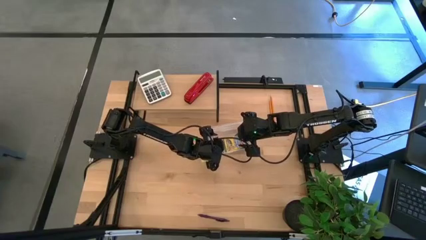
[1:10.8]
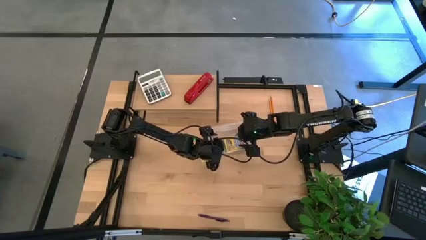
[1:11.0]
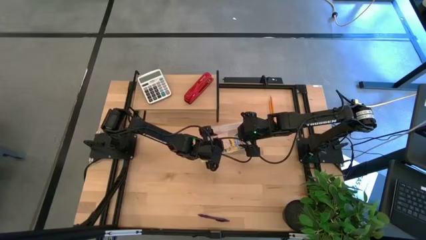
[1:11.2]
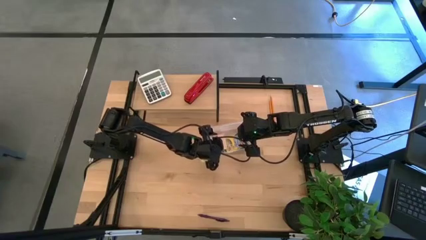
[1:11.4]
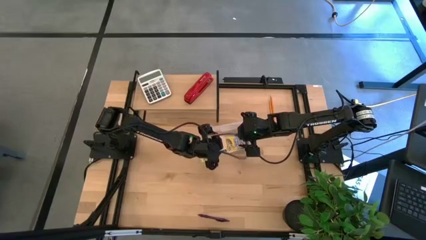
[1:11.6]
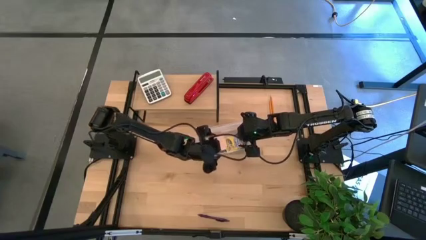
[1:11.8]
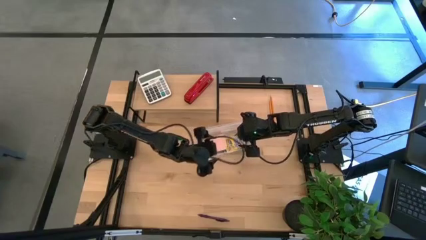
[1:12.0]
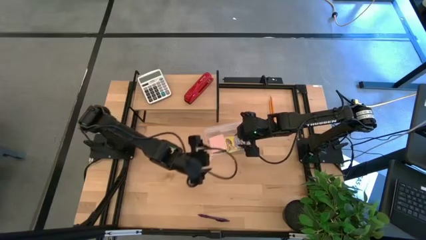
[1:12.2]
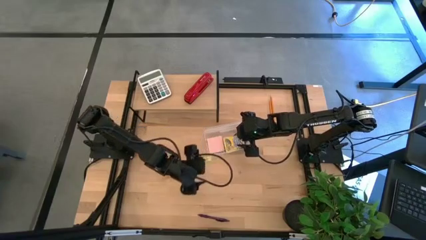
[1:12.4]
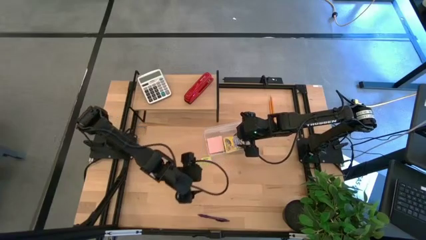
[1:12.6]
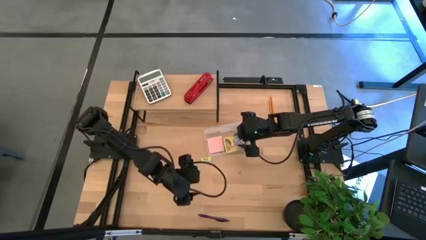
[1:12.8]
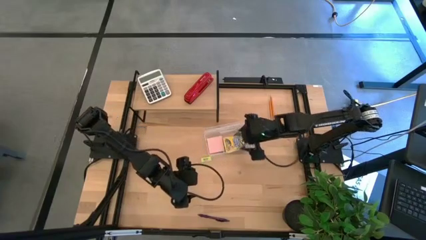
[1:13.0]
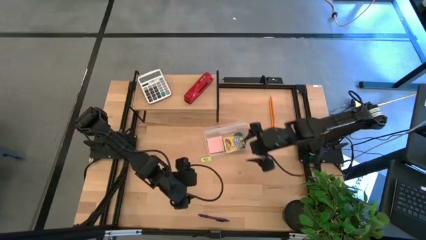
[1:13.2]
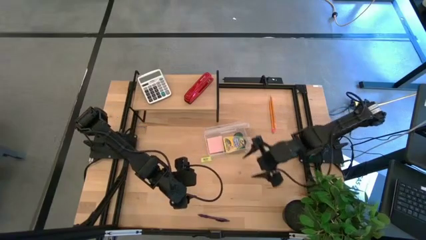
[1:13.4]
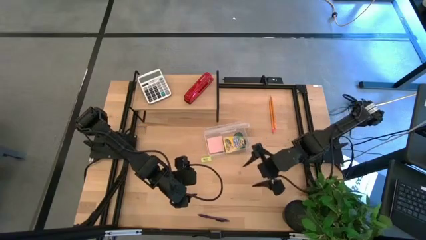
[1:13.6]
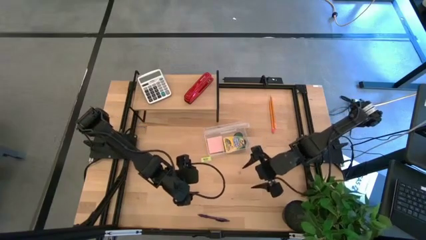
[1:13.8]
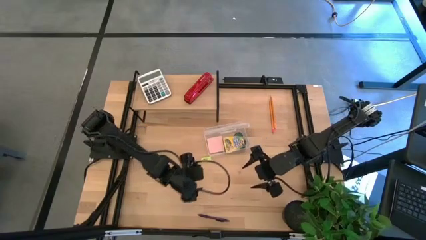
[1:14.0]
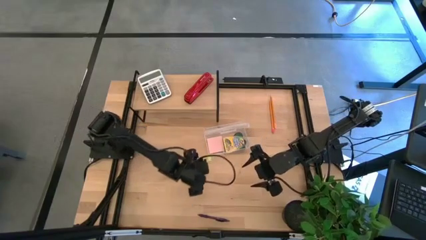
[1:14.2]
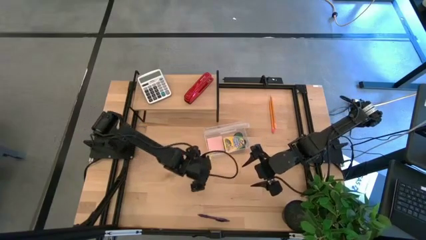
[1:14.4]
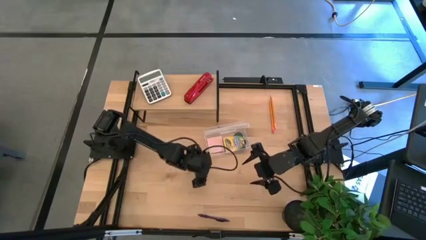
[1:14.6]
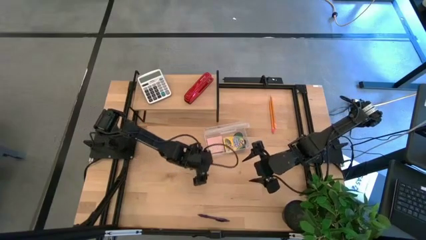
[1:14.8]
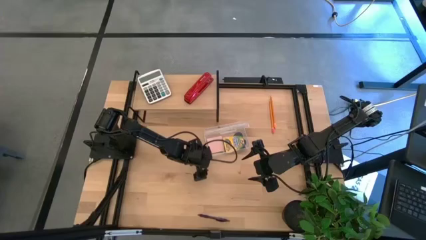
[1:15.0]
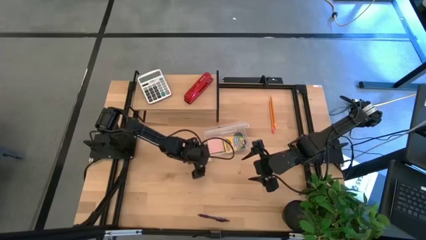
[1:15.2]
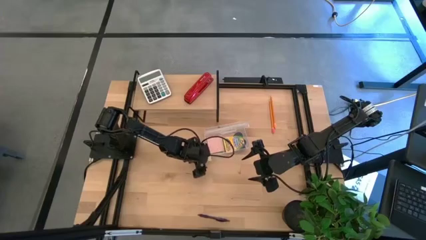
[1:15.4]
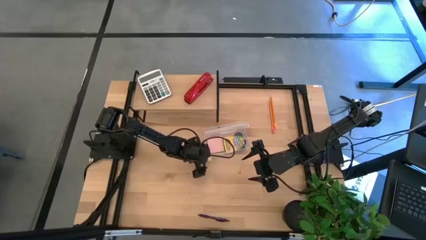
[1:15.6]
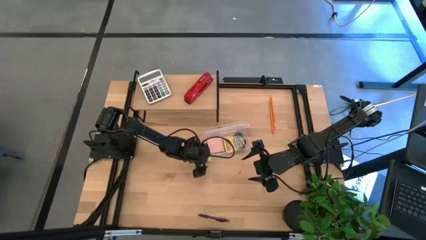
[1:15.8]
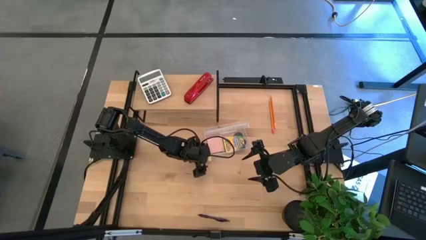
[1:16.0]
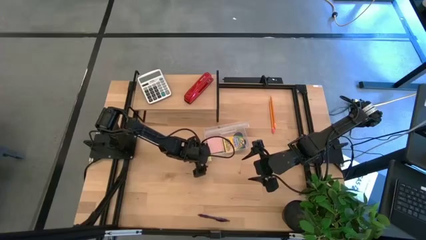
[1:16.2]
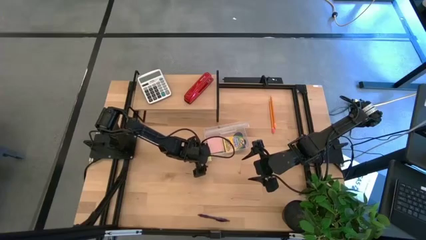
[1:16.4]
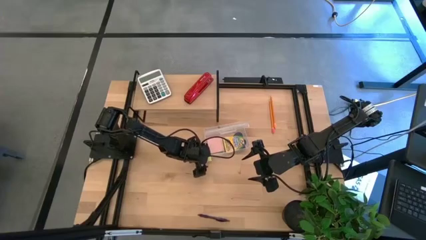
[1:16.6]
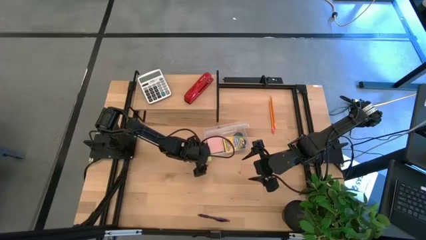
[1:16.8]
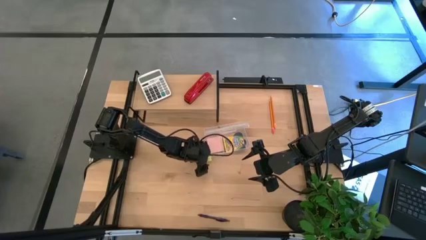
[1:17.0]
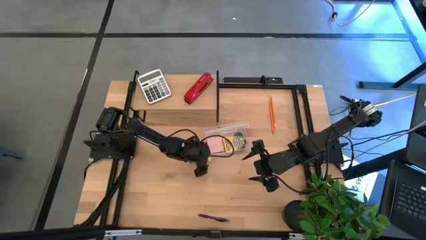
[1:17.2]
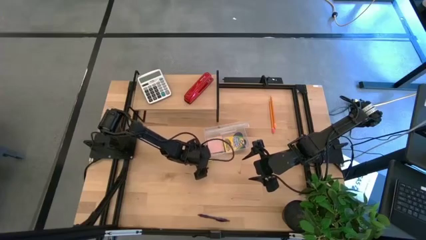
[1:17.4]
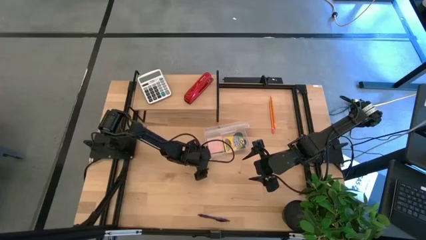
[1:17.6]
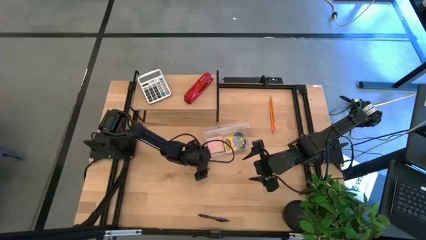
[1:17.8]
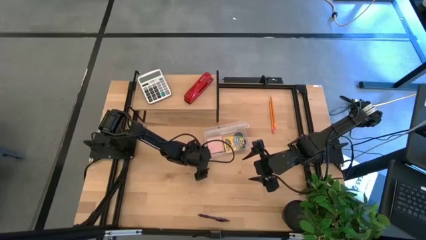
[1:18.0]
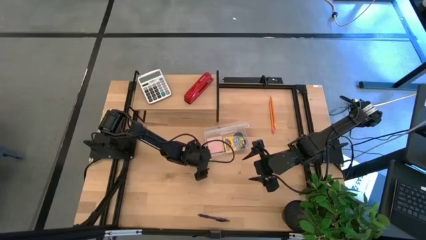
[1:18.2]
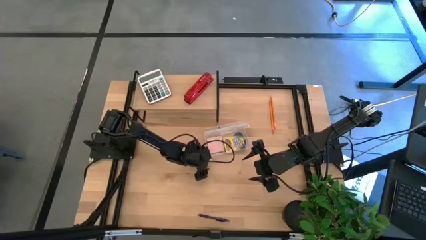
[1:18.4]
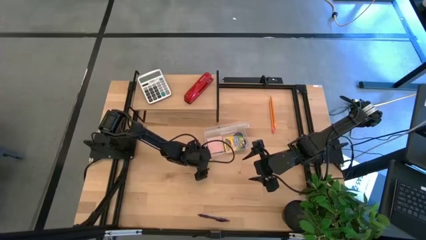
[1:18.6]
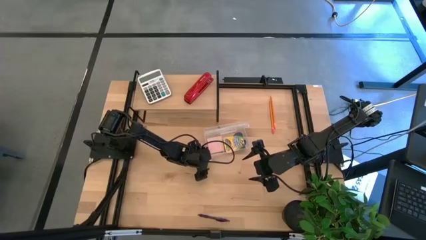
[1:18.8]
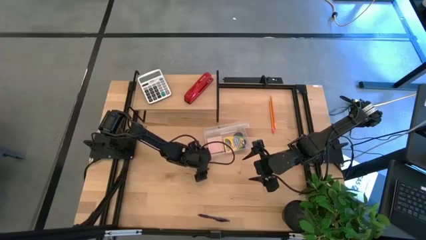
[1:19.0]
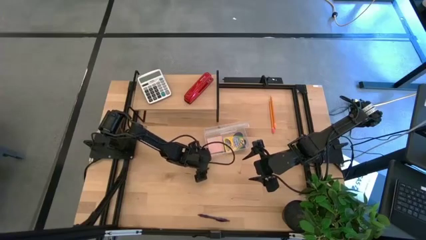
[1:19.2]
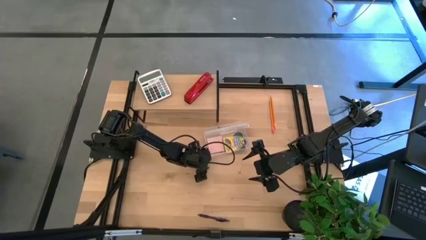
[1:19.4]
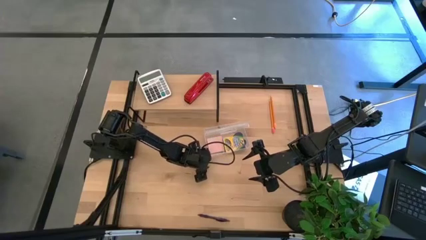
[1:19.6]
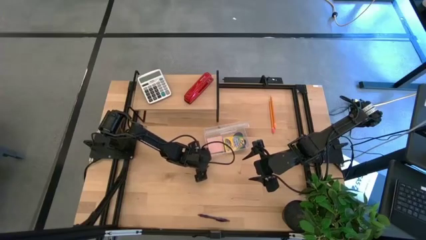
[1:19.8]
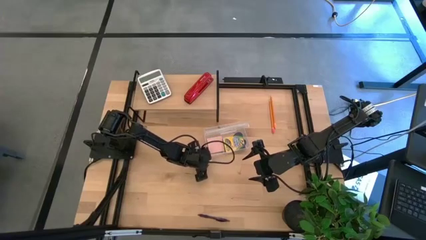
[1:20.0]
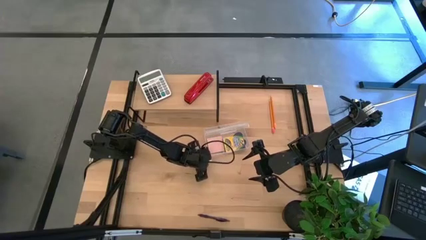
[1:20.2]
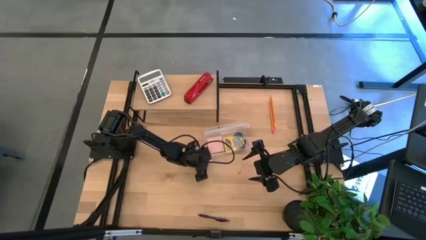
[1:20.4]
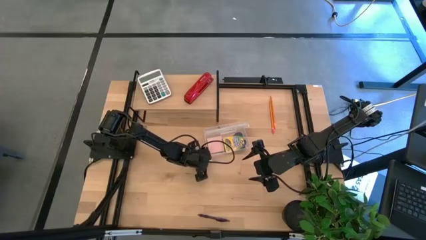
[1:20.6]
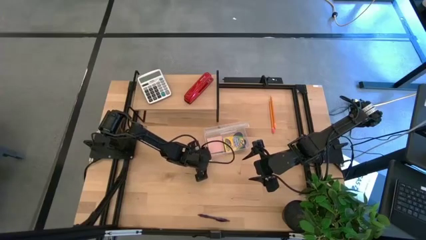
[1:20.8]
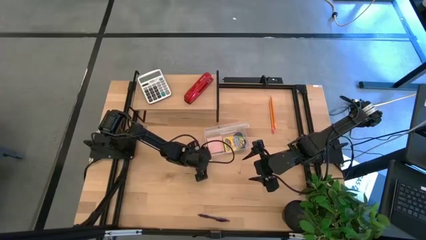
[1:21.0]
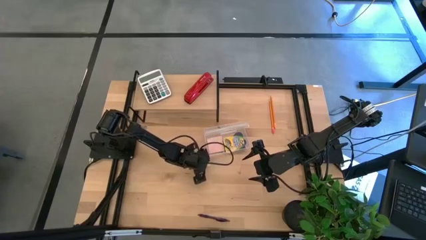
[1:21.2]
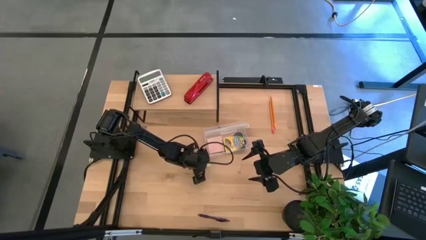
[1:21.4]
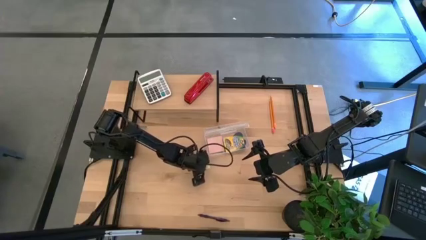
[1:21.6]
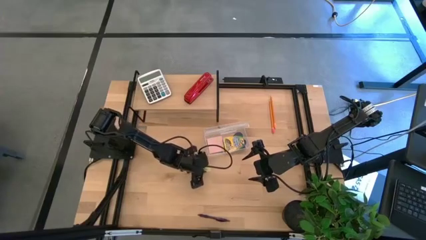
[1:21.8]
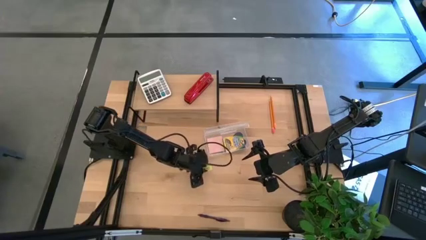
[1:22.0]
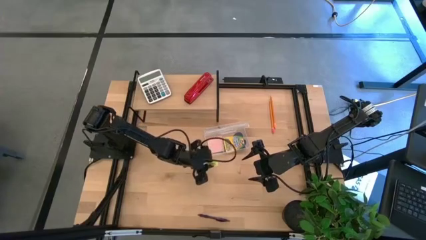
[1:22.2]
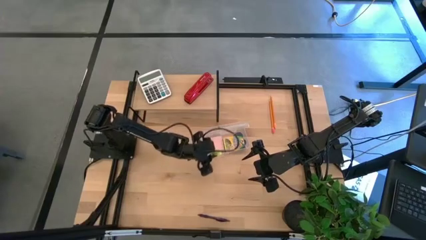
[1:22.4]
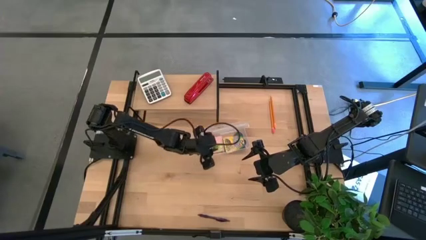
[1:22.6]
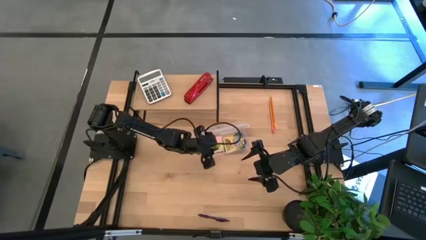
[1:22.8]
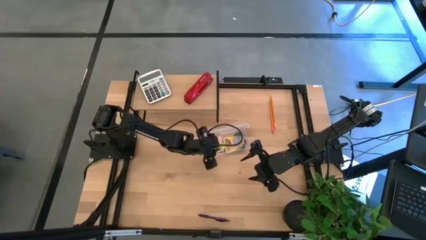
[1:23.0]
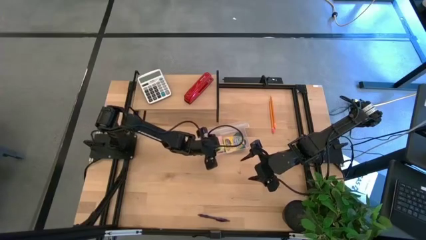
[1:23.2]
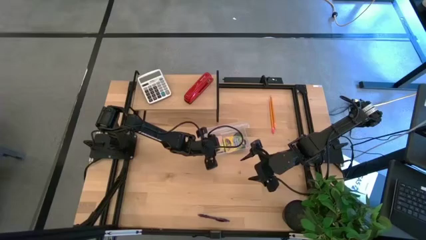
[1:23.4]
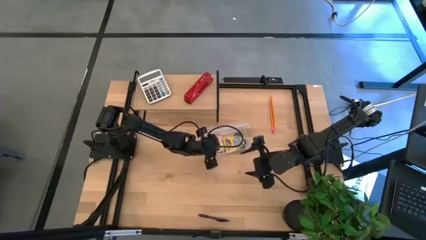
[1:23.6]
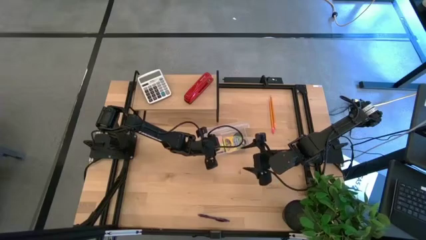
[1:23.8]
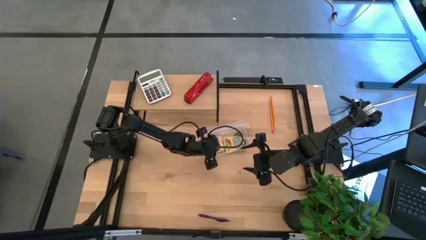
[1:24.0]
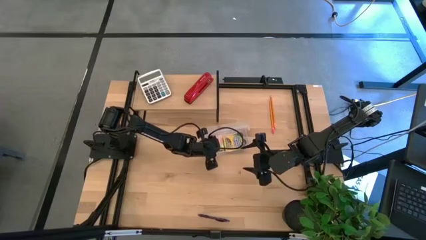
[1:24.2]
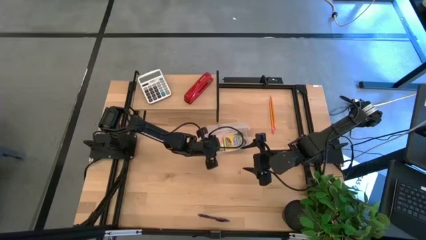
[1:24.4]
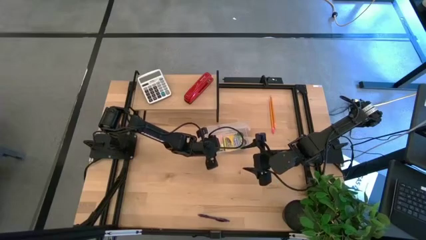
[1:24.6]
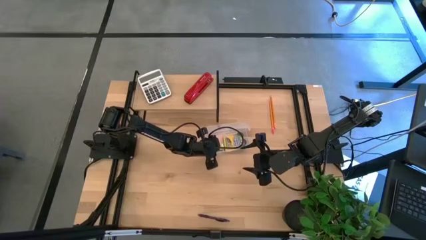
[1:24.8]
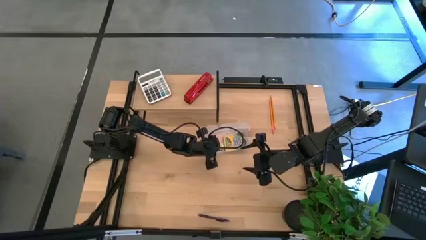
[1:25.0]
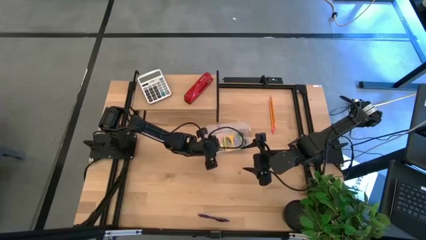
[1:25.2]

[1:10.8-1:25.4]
Task: Pack school essentials
Put the green eraser into the supply box

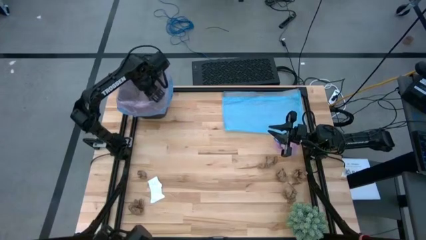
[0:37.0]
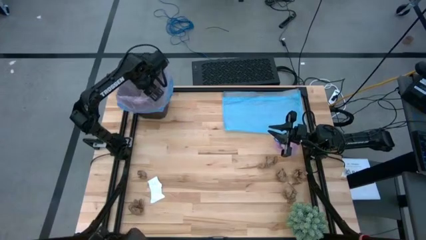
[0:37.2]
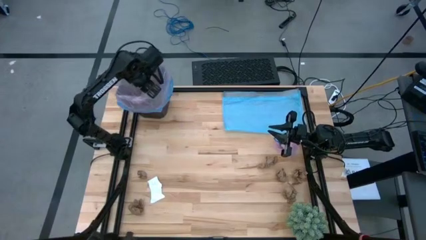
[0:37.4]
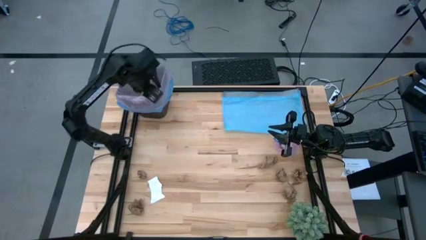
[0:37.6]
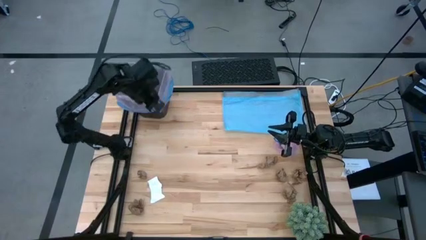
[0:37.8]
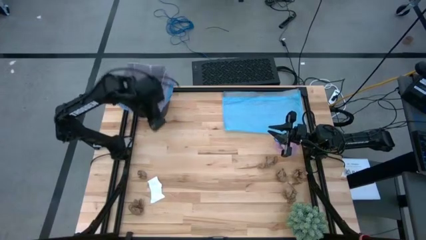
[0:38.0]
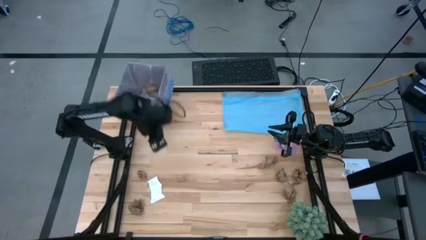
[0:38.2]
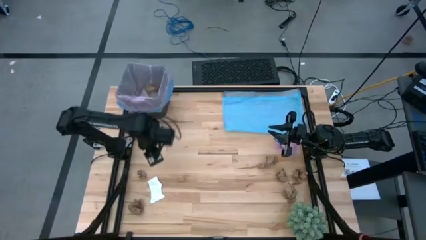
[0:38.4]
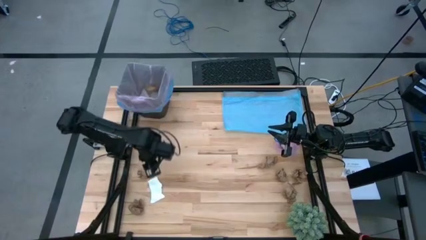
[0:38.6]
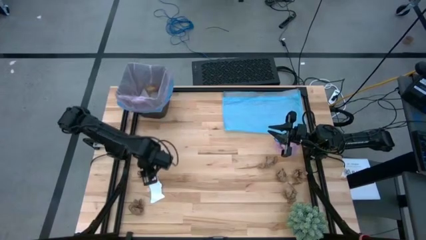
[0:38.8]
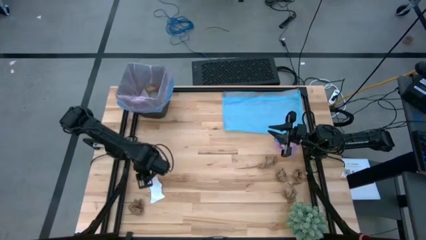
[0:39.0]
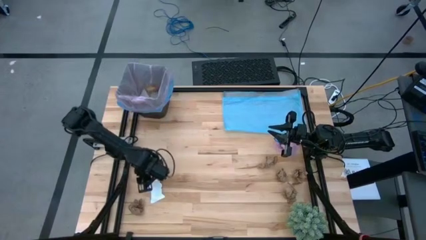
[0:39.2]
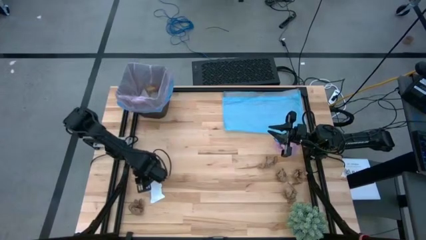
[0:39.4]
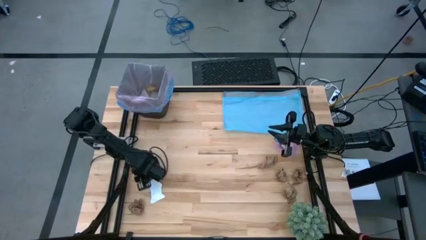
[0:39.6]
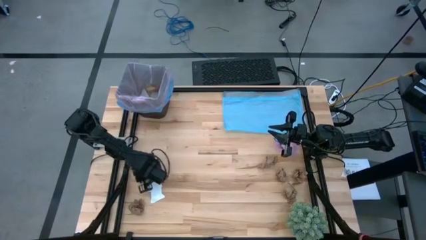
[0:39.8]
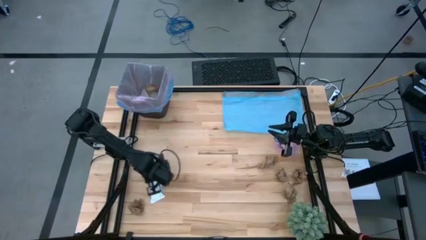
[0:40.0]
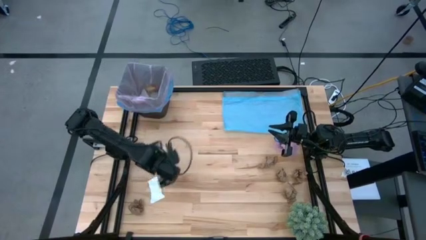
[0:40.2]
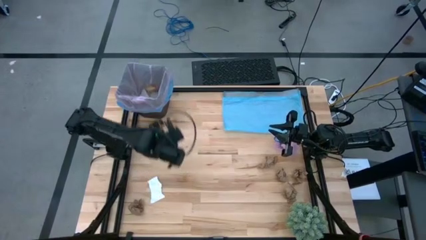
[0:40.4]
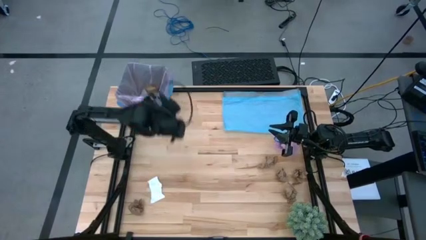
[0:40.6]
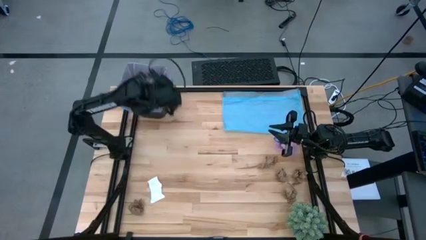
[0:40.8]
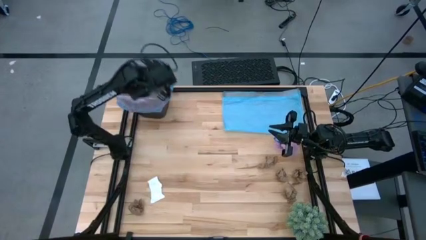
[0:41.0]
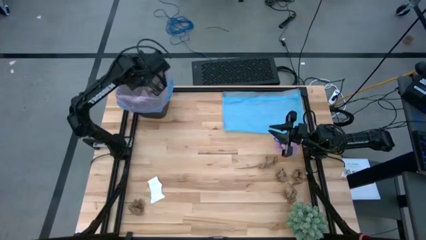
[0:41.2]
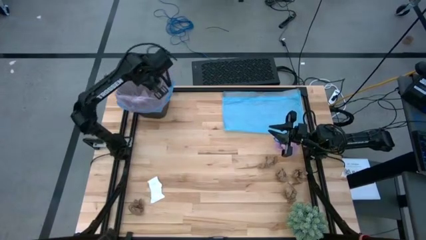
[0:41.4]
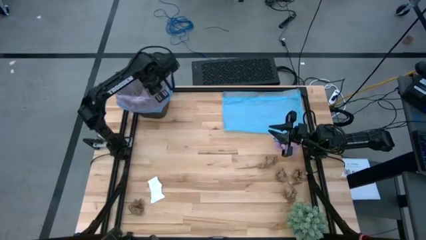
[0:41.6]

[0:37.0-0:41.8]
Task: place trash/remove bag and relplace
Put the brown napkin into the trash bin
